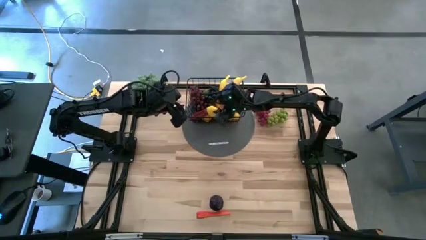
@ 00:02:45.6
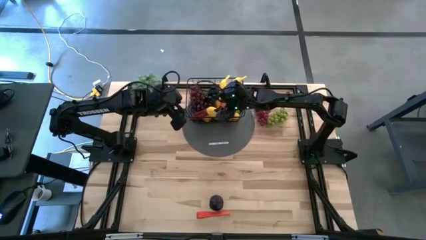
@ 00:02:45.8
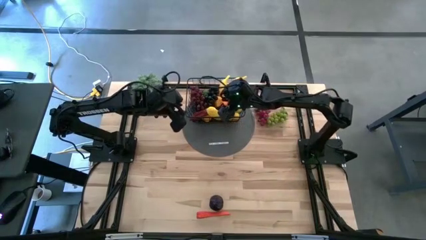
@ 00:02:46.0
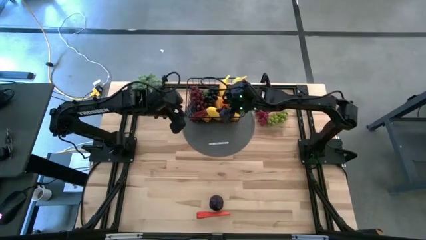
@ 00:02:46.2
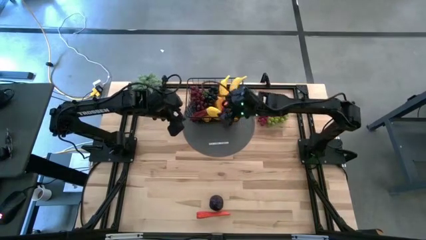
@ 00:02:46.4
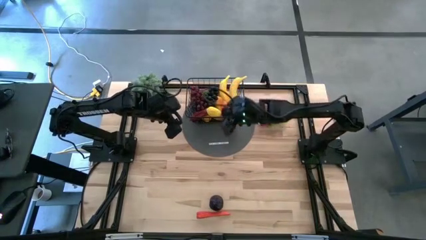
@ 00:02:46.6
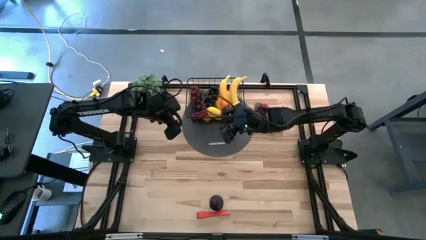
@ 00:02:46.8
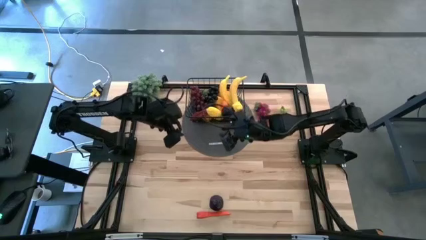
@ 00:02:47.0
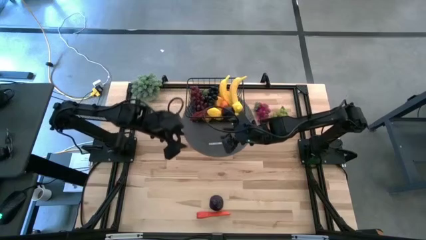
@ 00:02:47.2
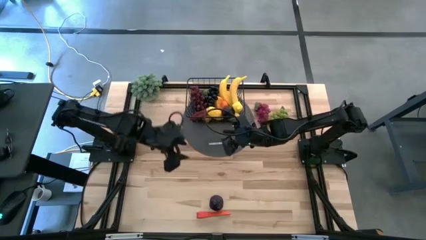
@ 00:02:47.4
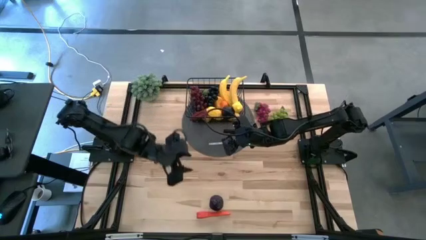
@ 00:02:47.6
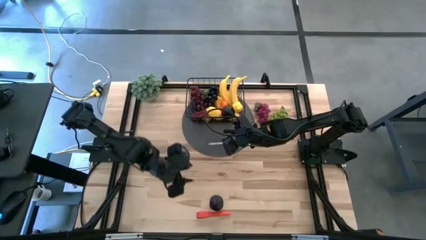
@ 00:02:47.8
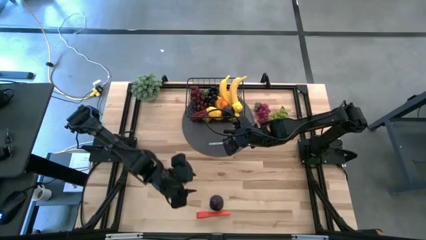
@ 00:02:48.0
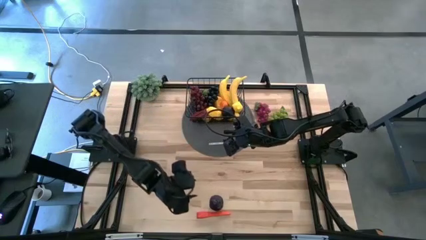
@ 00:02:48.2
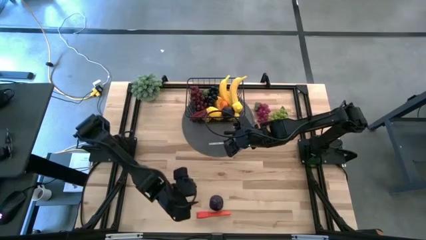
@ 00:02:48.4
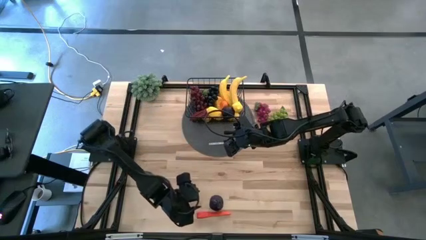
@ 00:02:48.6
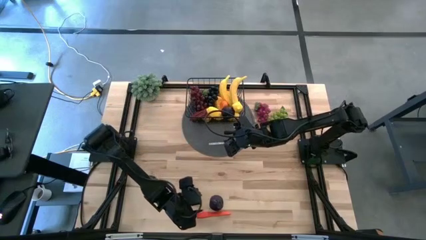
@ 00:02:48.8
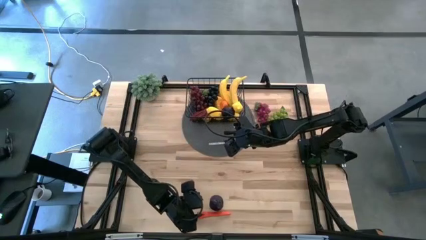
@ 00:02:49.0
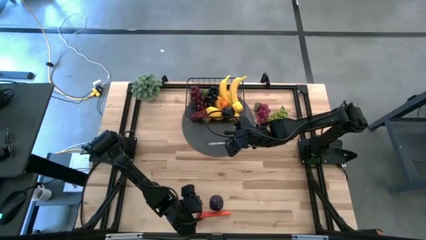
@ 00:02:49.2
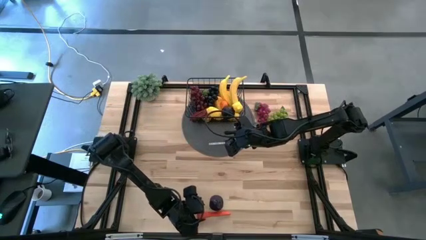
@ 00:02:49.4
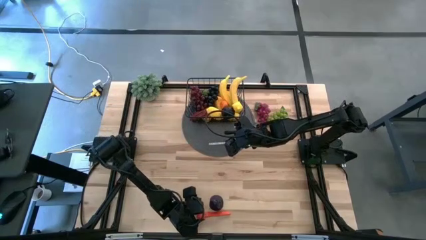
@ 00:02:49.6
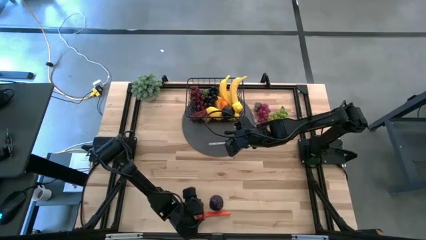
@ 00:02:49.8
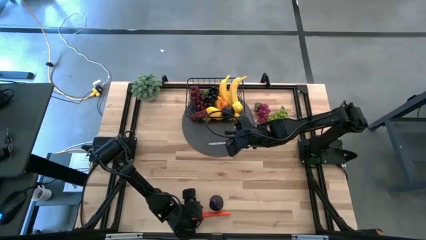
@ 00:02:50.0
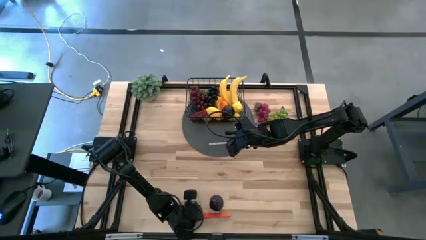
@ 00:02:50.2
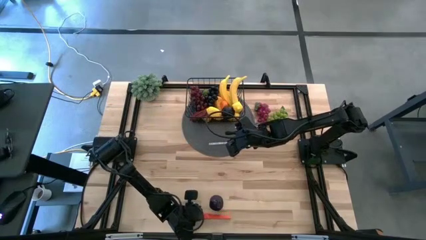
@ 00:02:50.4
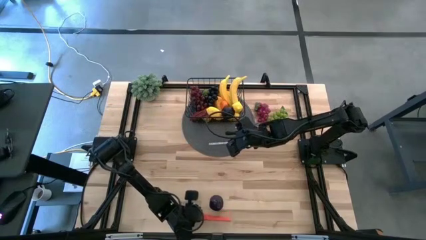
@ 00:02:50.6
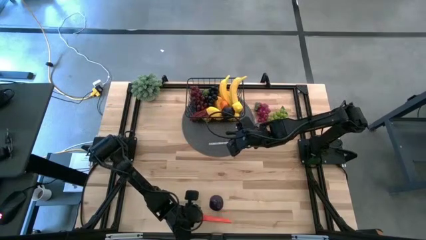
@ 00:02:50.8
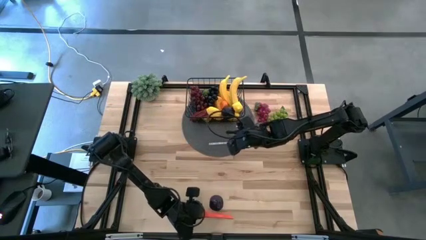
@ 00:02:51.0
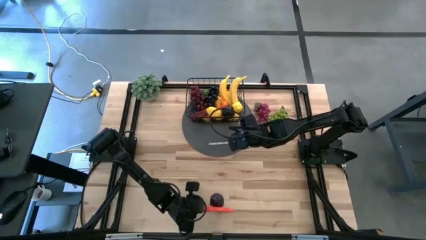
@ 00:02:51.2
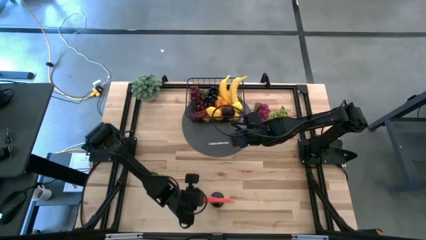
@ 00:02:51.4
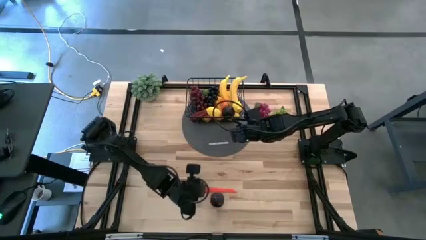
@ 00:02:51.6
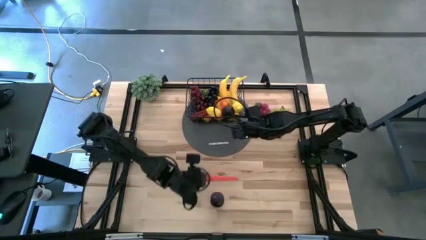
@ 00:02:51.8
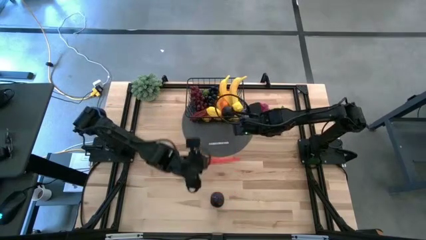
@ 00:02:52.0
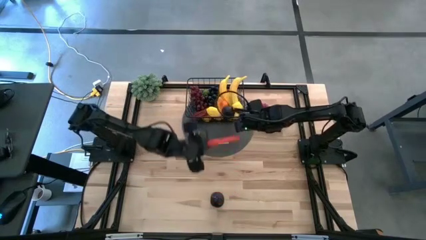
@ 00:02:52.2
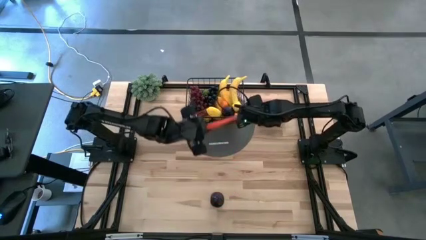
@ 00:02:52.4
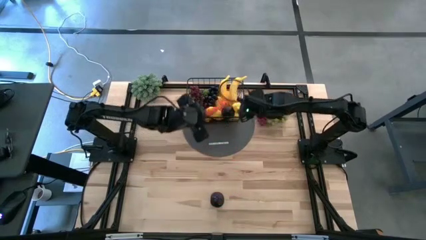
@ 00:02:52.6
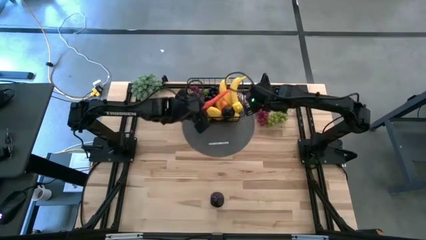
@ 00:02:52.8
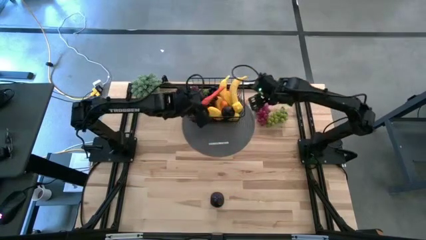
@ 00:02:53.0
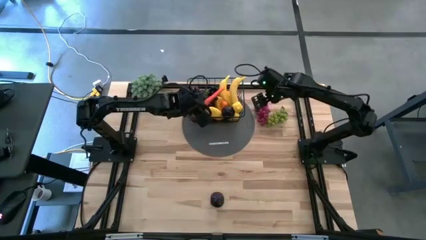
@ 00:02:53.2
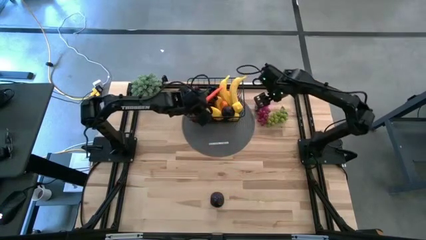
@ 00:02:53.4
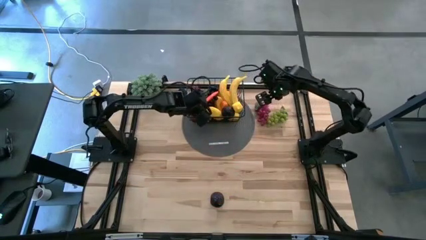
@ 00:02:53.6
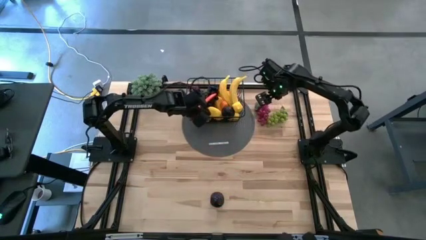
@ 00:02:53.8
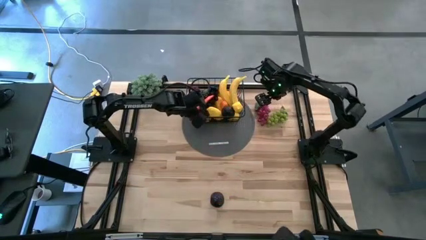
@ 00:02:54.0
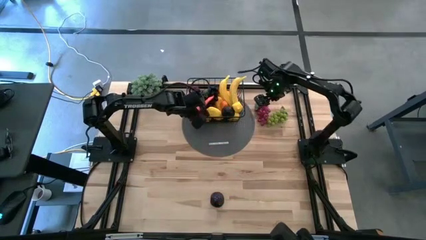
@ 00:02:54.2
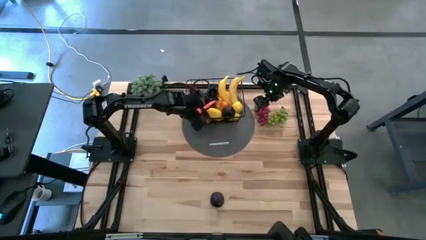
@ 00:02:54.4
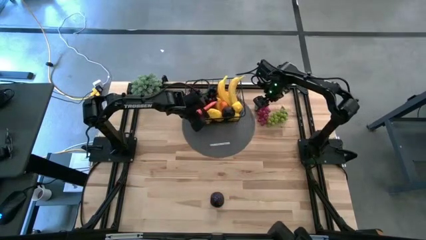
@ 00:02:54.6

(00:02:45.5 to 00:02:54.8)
Task: Build produce basket
Put the orange carrot into the black wire basket

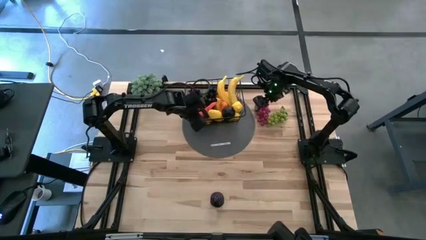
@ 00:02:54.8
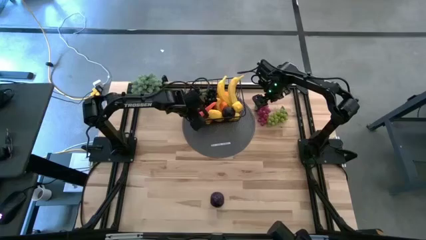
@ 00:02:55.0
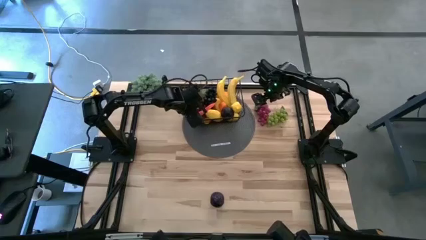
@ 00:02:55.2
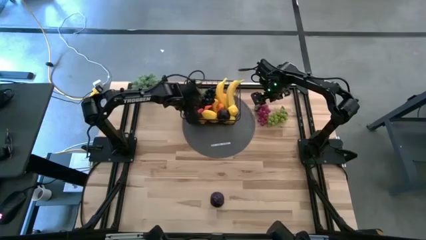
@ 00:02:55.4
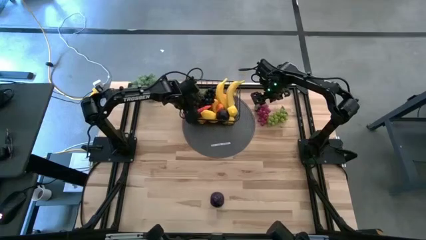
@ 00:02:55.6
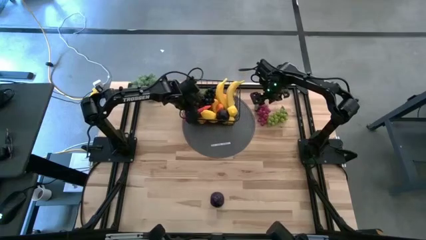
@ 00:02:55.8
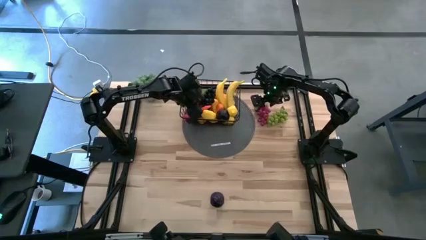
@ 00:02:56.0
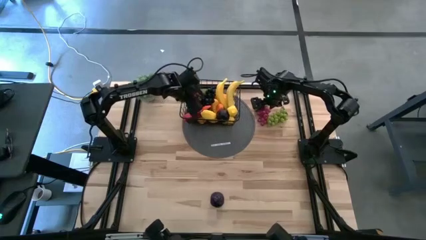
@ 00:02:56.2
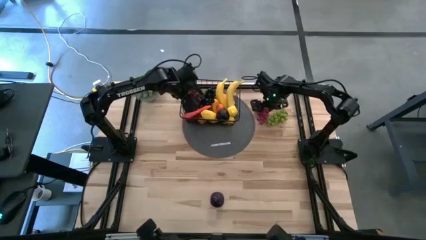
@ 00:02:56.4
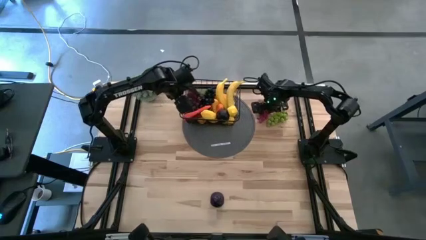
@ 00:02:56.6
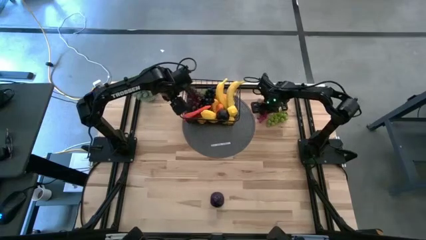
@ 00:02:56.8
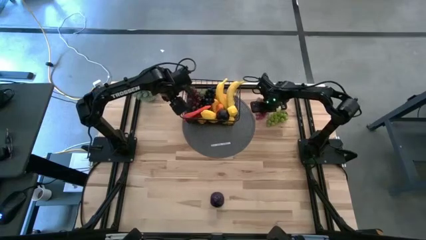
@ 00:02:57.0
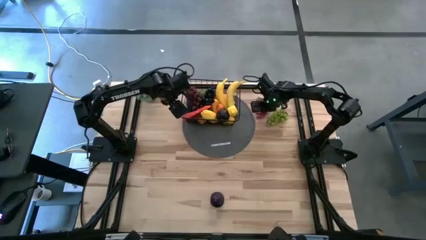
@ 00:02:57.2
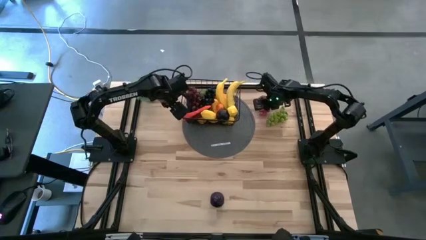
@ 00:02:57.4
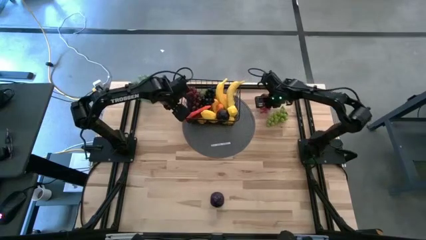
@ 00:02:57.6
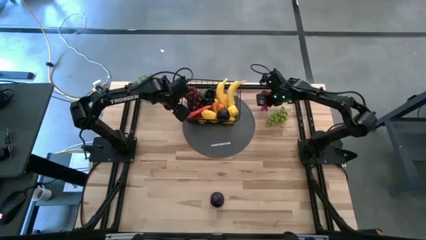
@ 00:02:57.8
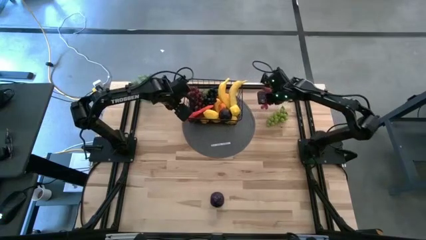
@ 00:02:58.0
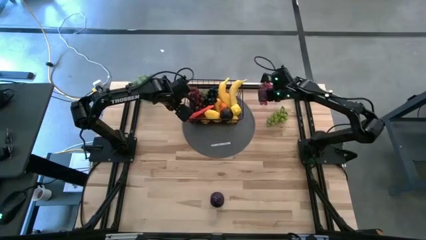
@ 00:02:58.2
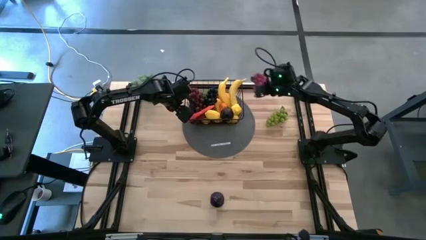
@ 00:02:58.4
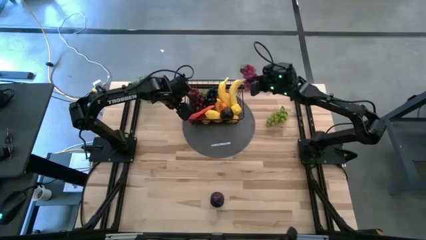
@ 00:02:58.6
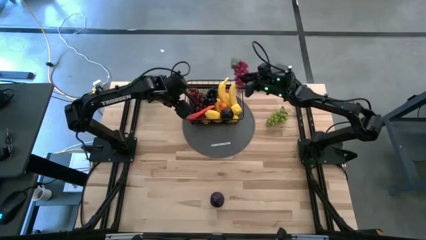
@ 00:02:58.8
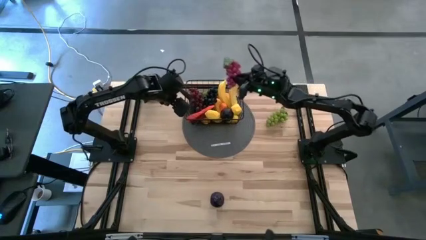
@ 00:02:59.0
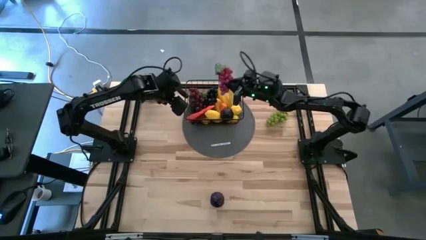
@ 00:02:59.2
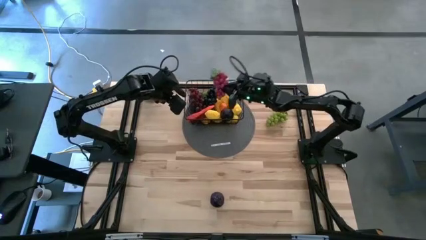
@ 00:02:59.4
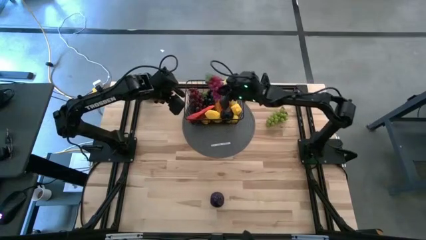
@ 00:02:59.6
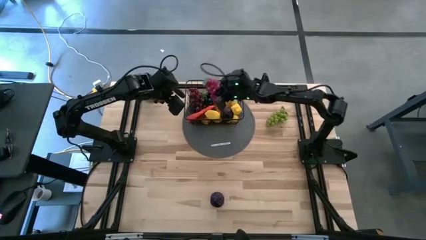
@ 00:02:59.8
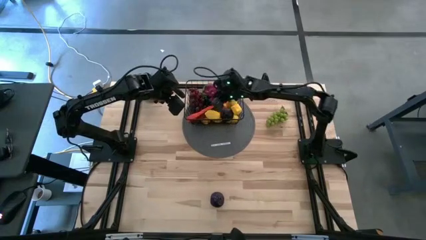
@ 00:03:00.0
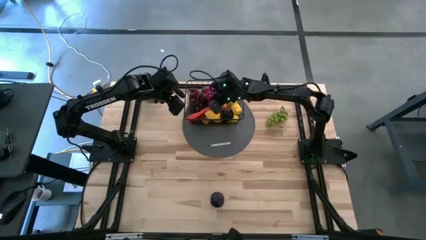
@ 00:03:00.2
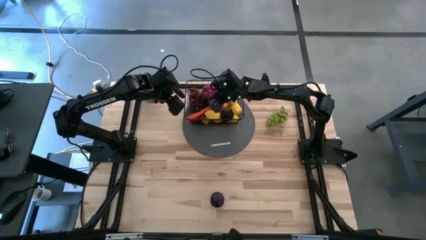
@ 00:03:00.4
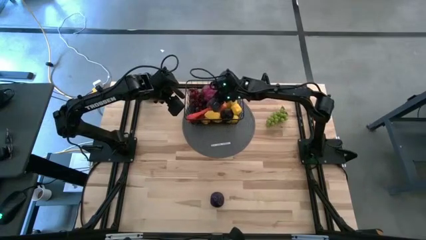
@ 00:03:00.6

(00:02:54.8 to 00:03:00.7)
Put the purple grapes into the black wire basket
